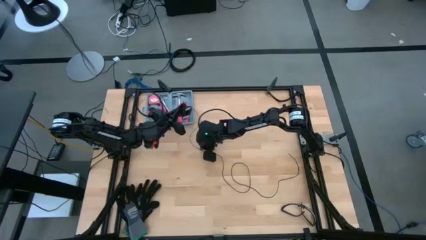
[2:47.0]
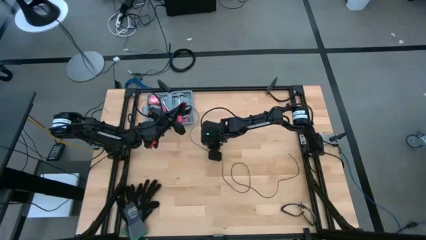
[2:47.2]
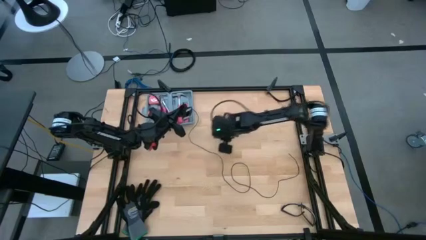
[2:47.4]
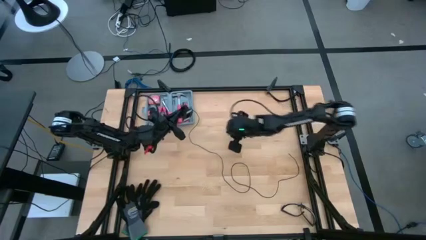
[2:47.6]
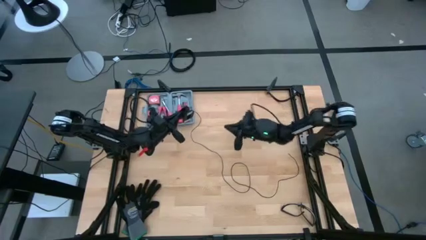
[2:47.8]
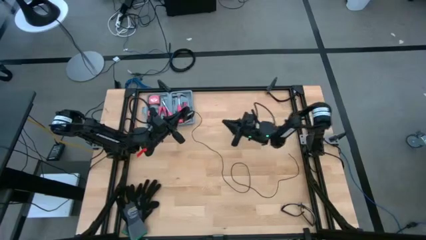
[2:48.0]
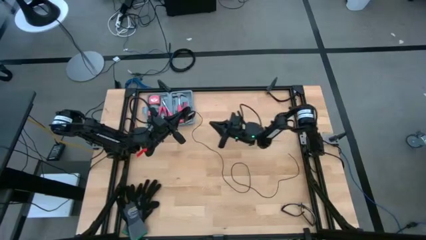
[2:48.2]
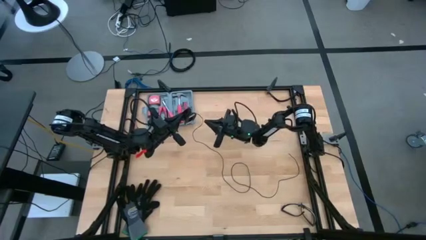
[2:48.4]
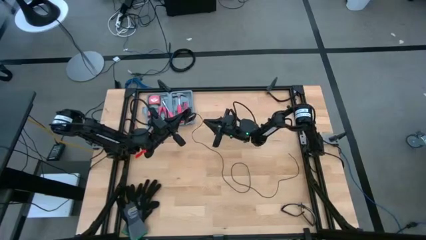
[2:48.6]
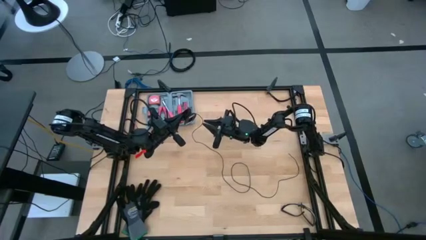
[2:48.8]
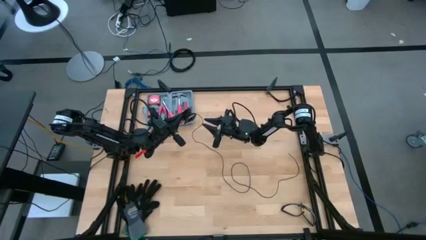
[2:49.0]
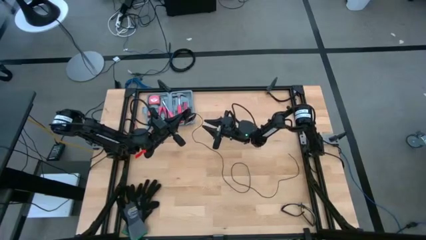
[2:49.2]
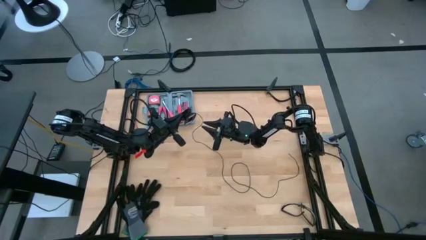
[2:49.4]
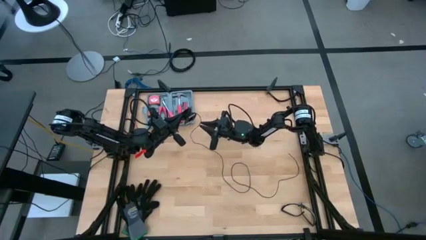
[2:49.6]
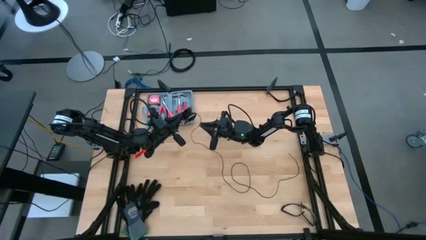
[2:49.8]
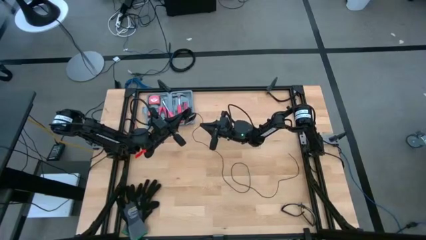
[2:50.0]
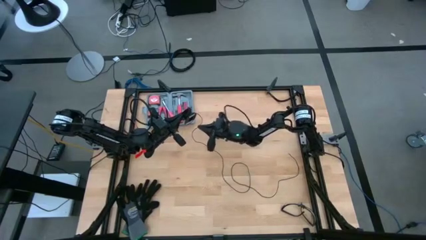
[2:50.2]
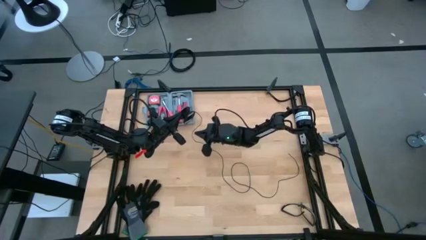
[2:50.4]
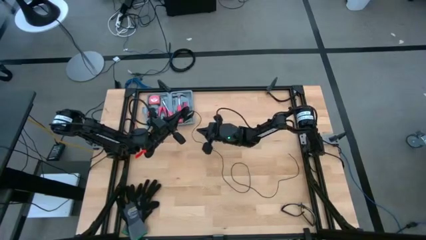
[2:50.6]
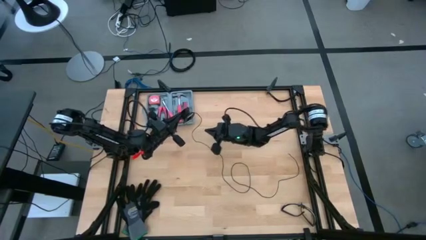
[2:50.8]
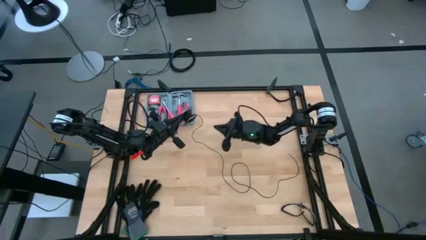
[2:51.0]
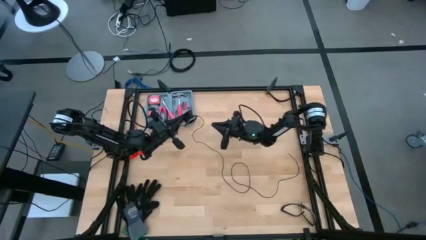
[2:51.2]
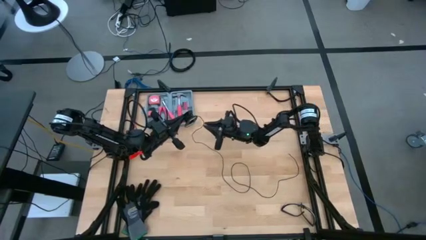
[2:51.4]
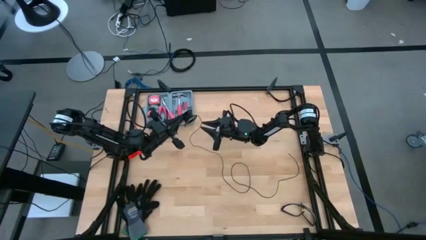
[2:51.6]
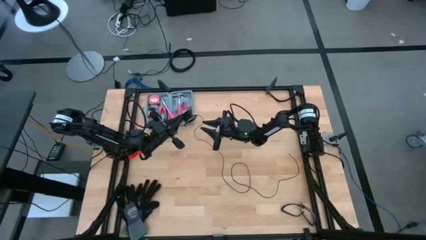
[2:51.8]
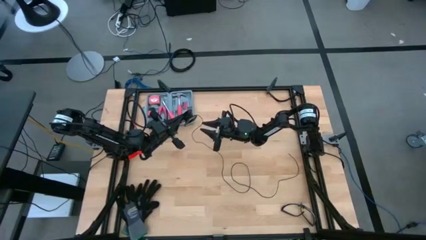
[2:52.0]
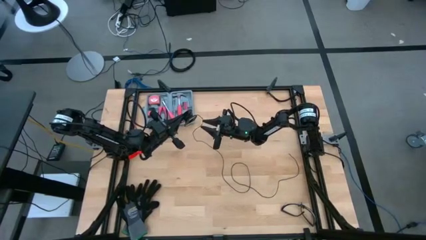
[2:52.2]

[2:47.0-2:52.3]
Task: Coil cords
Coil the black wire onto the spool

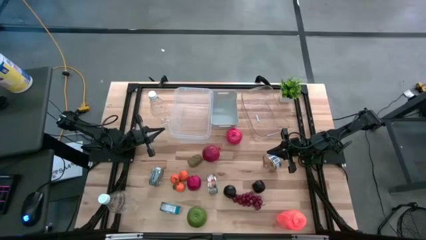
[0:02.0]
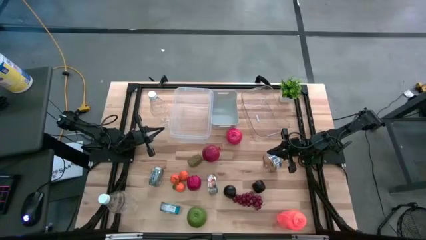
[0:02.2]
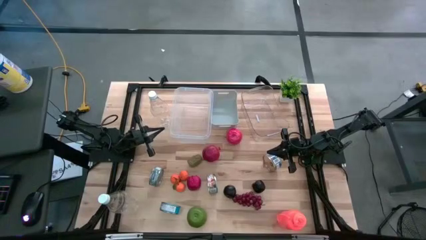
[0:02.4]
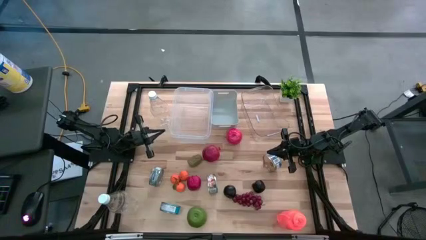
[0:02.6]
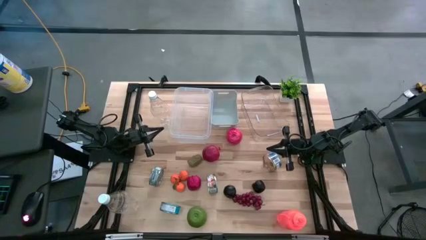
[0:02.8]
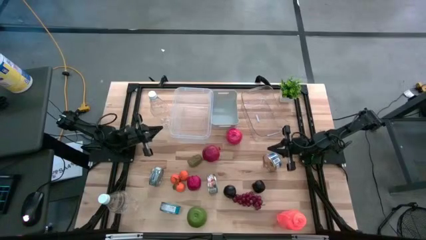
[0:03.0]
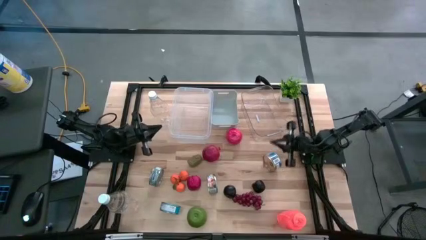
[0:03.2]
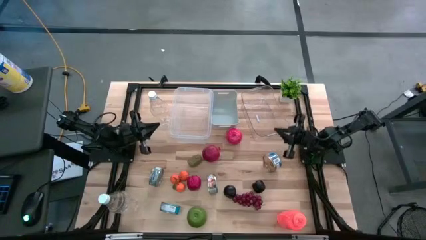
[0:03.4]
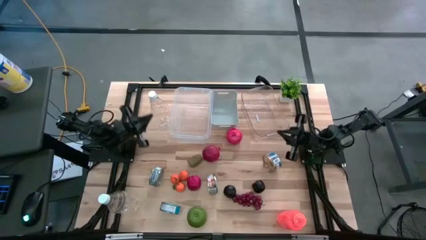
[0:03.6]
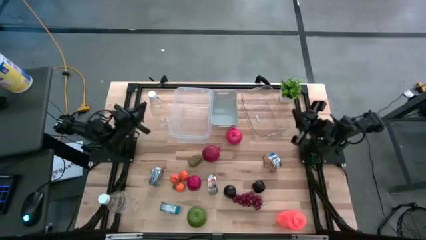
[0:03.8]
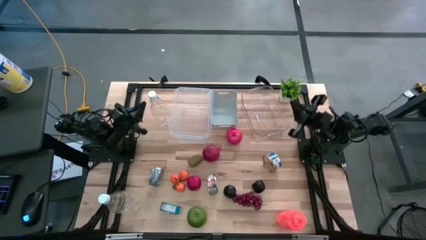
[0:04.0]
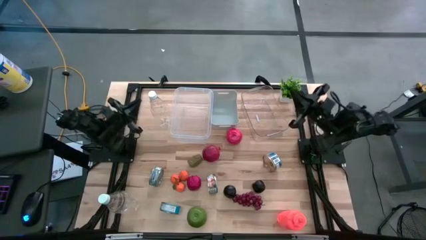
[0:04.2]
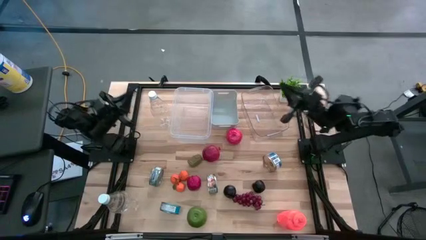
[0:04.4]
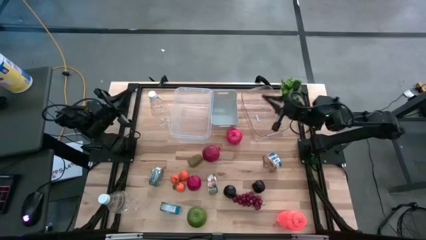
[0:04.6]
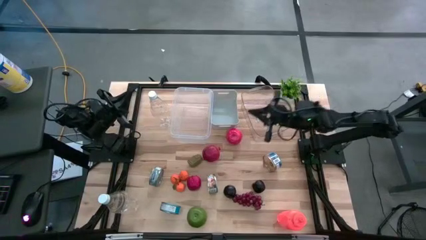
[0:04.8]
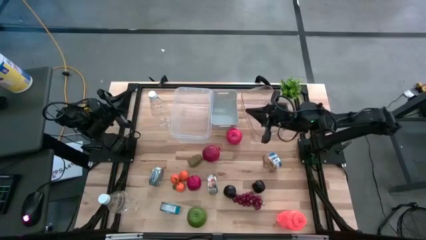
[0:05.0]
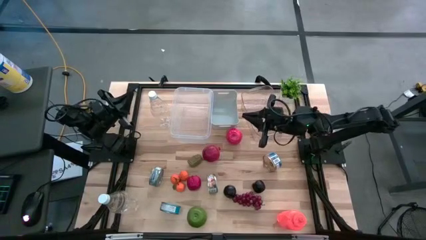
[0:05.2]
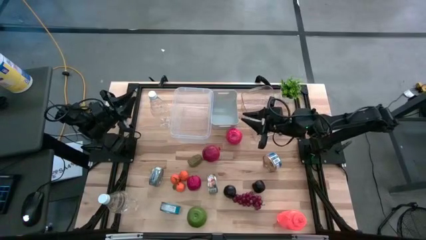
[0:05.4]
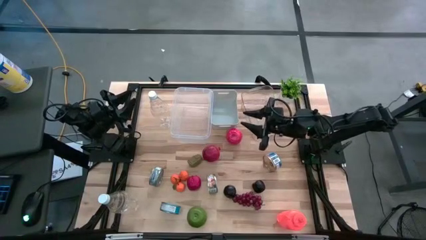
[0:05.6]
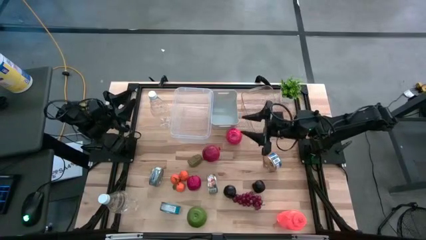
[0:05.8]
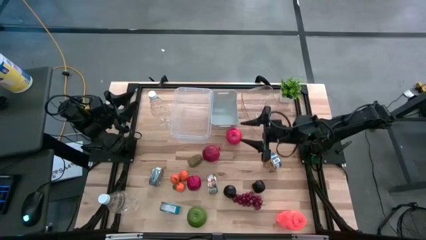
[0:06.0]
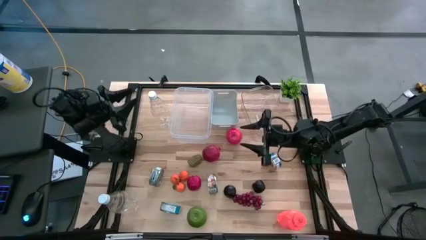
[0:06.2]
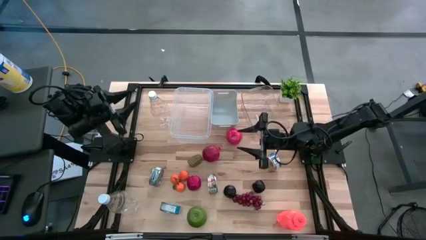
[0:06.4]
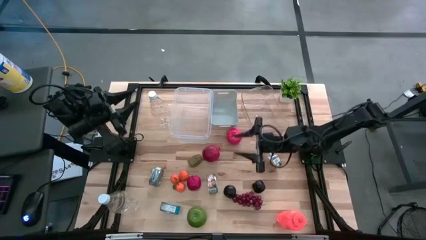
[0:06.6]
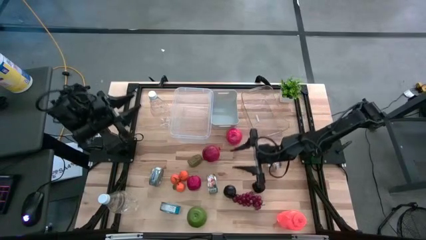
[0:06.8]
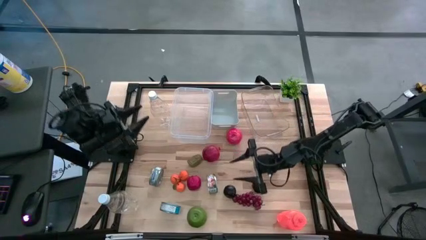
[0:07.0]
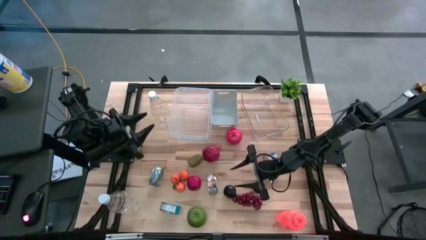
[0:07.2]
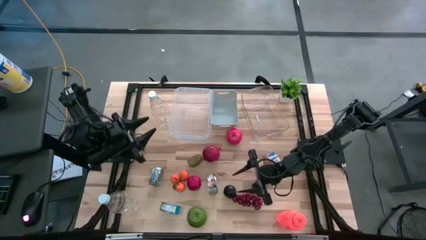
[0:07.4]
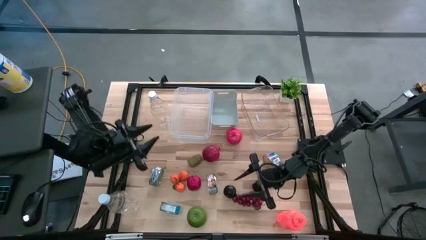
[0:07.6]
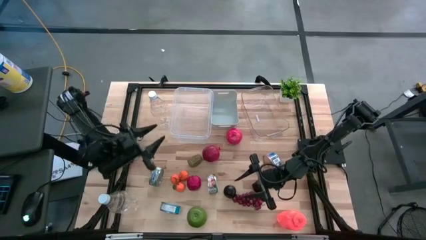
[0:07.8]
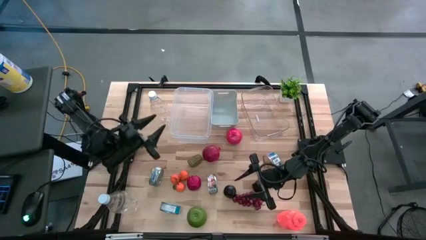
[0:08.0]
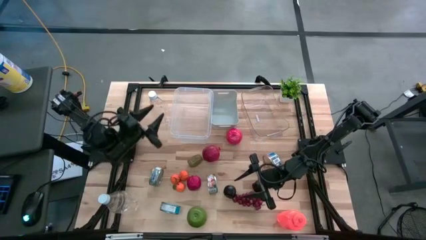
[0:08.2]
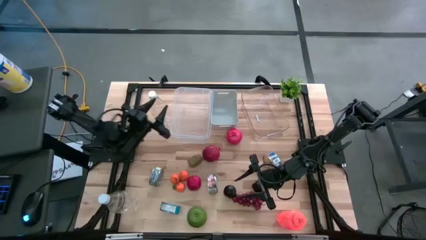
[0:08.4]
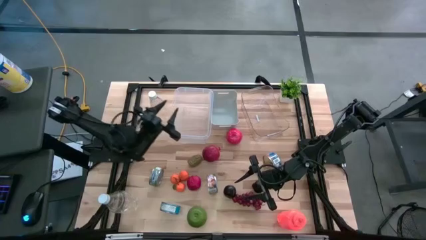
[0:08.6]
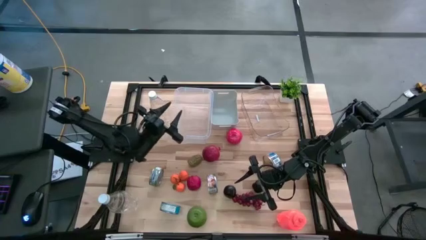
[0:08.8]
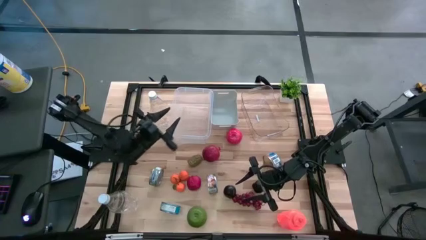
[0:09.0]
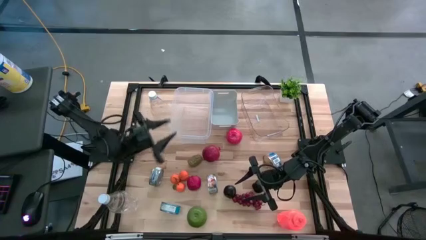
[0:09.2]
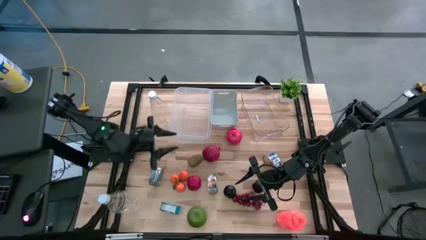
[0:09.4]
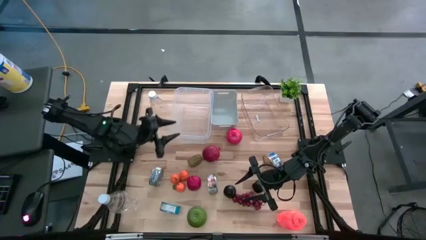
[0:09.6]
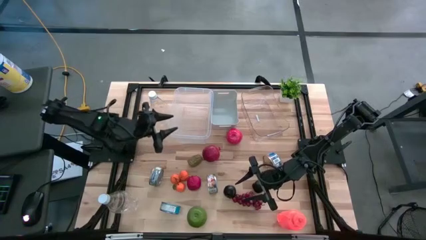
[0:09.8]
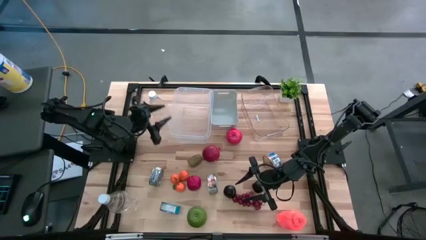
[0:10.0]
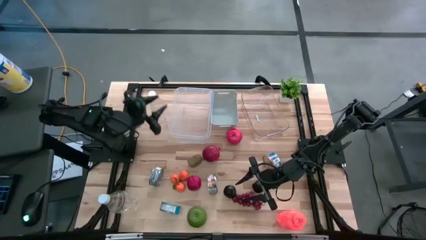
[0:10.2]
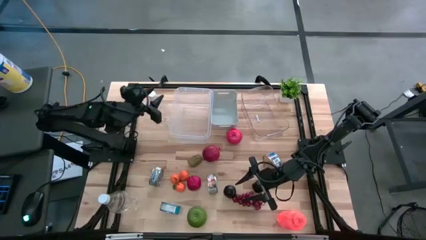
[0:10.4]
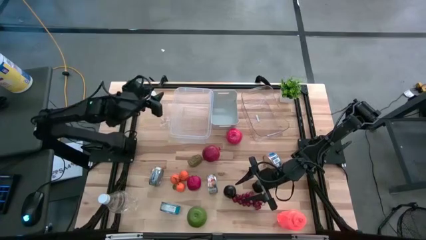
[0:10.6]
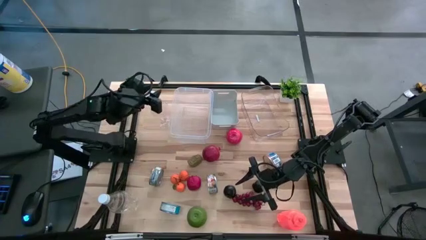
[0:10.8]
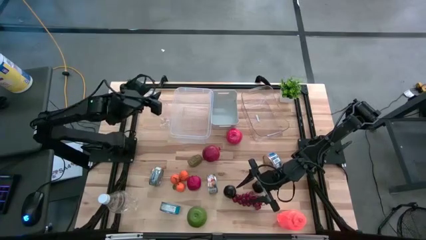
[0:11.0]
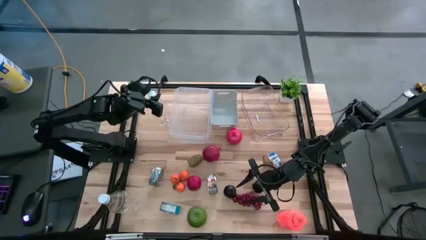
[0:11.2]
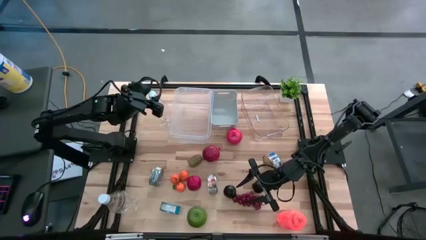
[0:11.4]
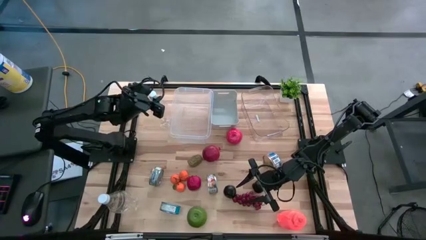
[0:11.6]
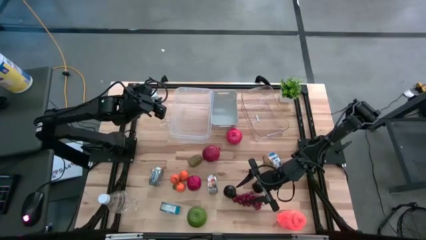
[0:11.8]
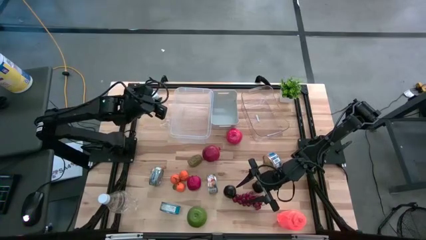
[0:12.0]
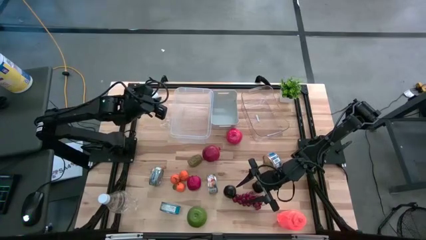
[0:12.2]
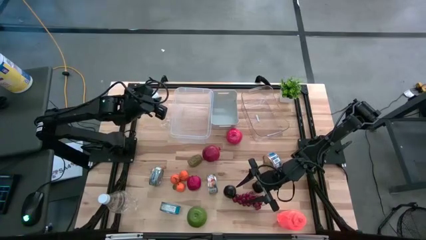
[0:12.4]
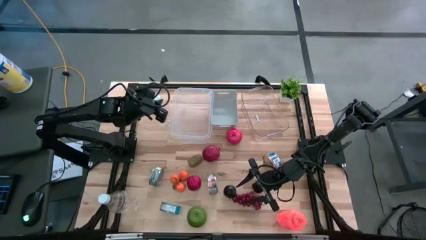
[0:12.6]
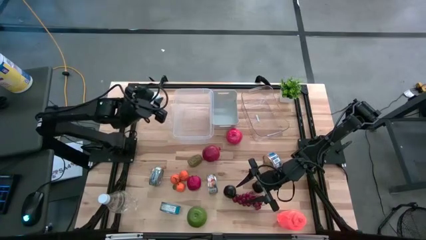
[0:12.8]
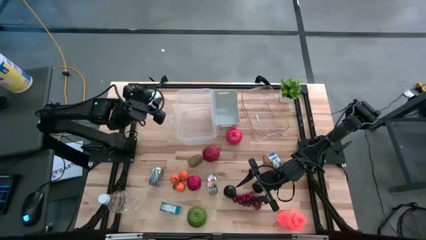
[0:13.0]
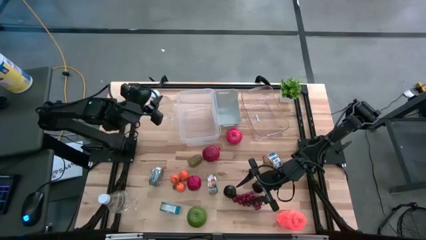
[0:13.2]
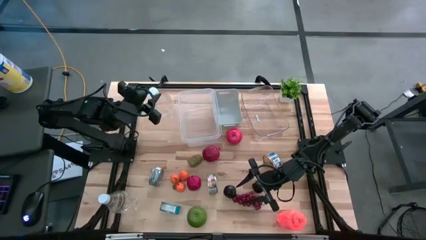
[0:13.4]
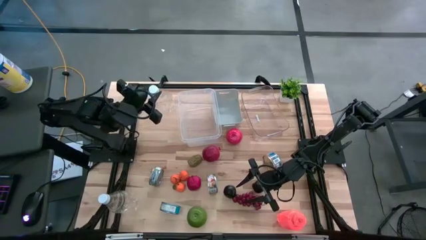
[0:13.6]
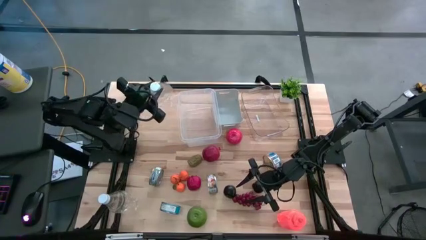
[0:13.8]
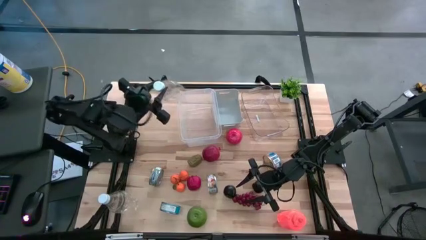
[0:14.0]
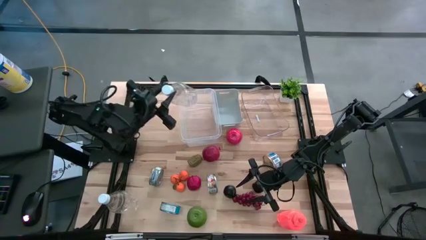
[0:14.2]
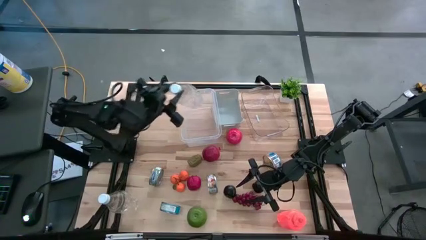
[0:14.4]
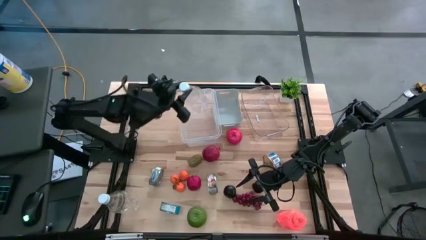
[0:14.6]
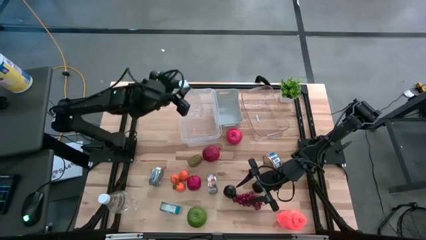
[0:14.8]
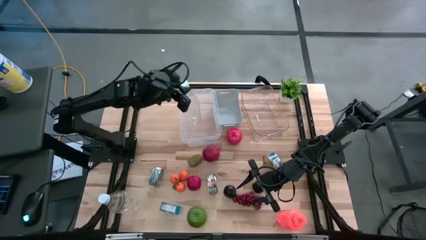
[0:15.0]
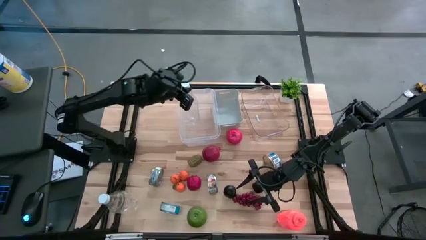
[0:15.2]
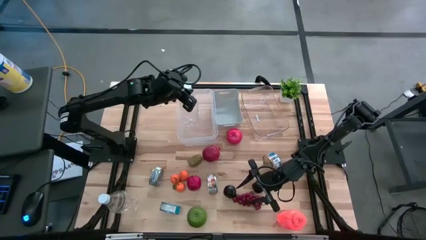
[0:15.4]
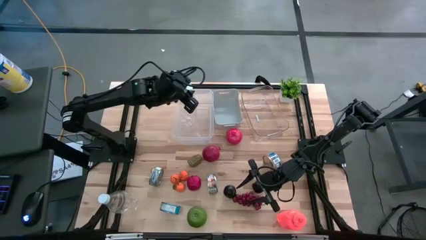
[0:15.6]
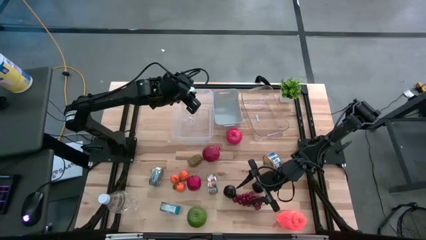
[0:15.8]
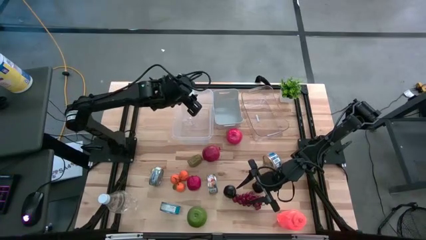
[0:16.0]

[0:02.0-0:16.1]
Task: Pick & Place Food Item
Put the top transparent water bottle into the left transparent bin
